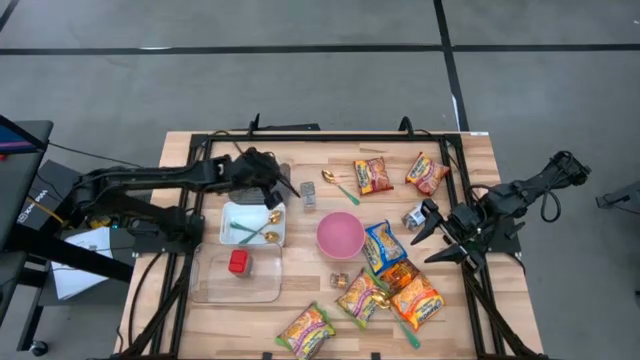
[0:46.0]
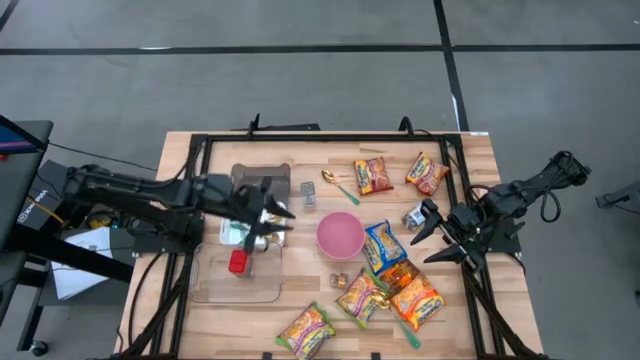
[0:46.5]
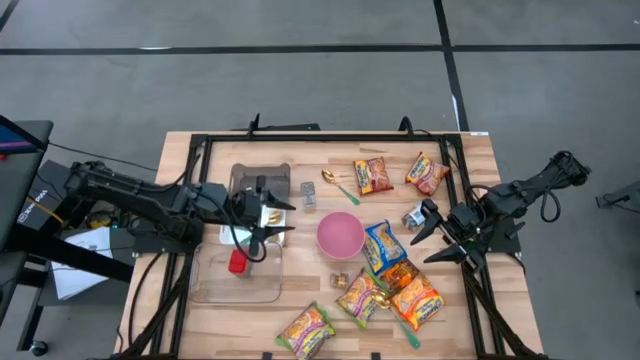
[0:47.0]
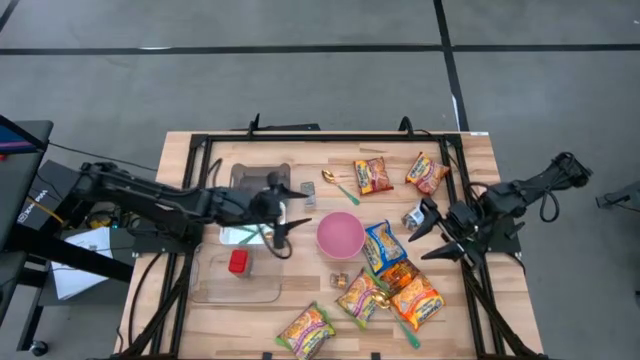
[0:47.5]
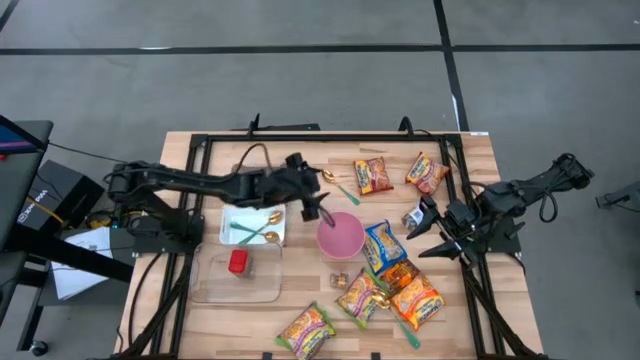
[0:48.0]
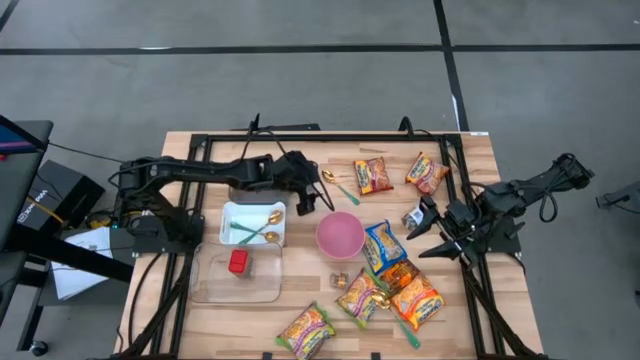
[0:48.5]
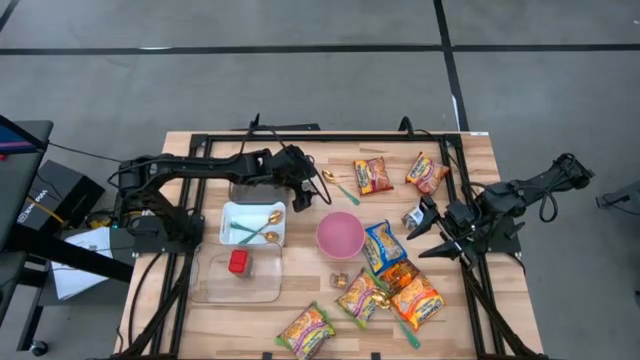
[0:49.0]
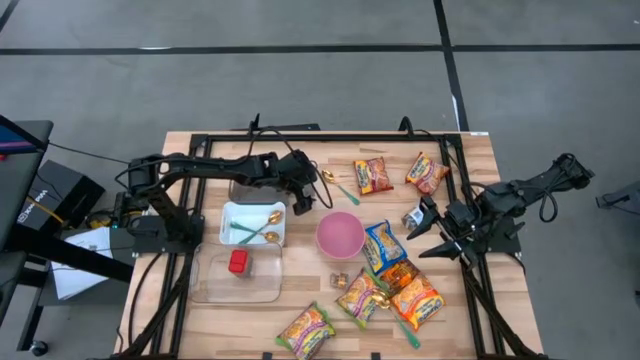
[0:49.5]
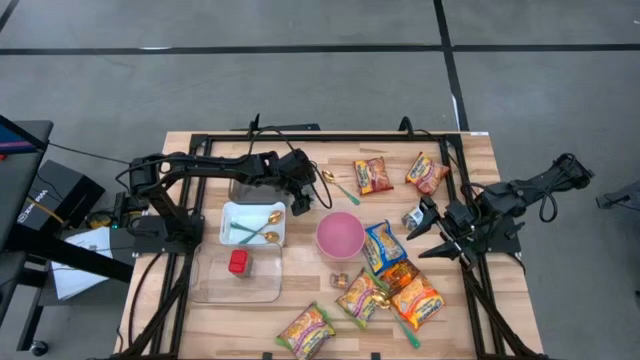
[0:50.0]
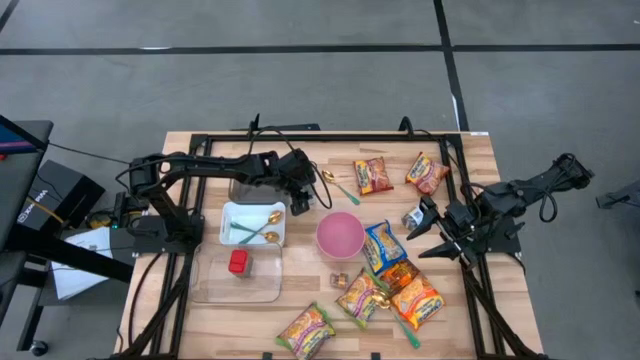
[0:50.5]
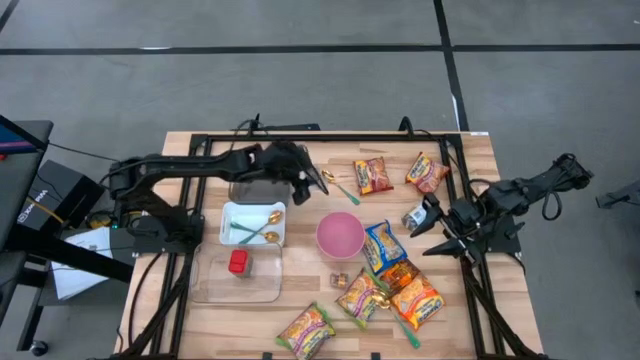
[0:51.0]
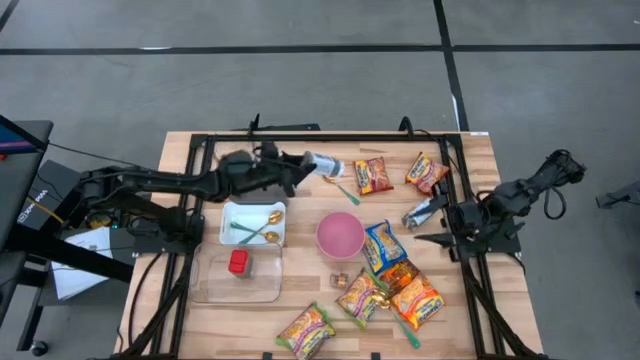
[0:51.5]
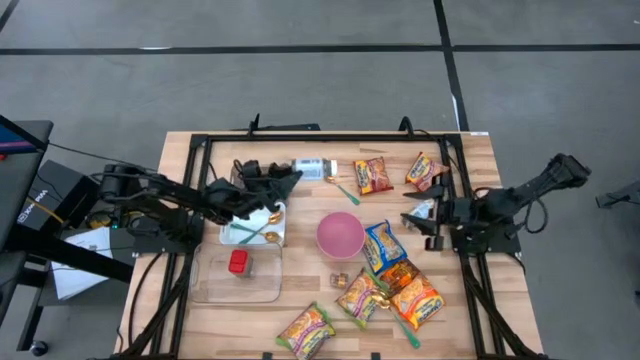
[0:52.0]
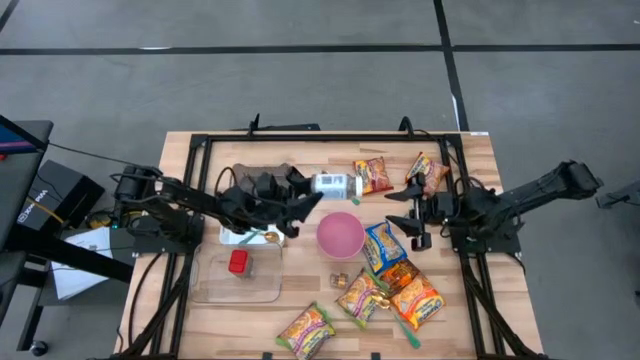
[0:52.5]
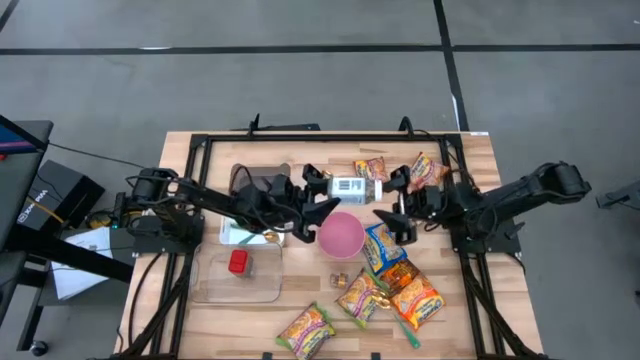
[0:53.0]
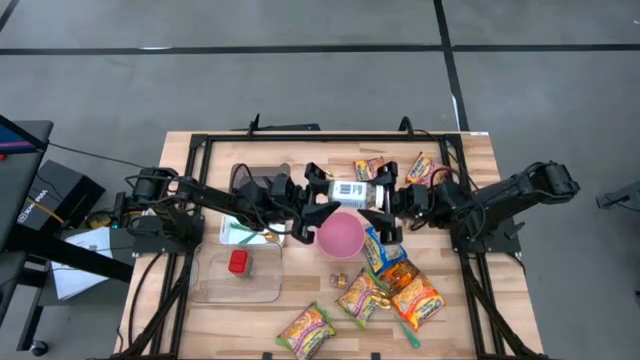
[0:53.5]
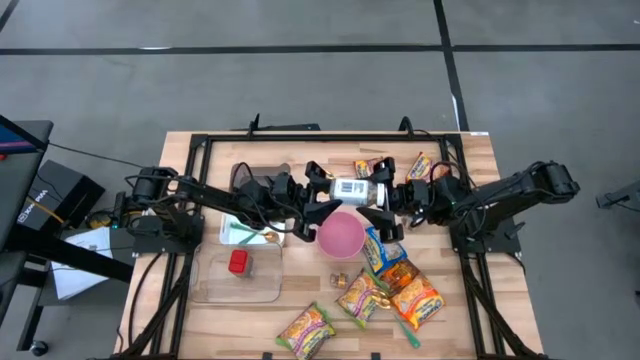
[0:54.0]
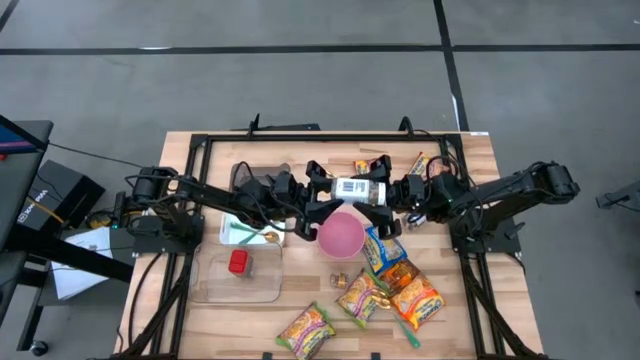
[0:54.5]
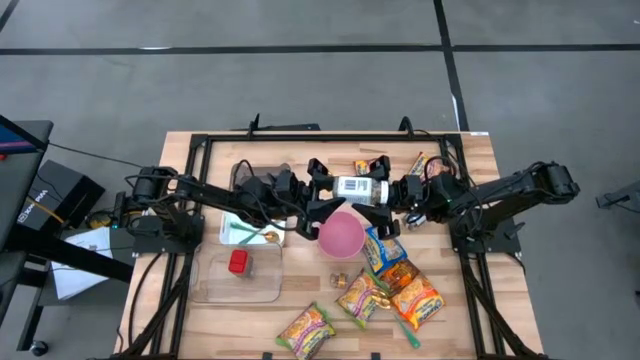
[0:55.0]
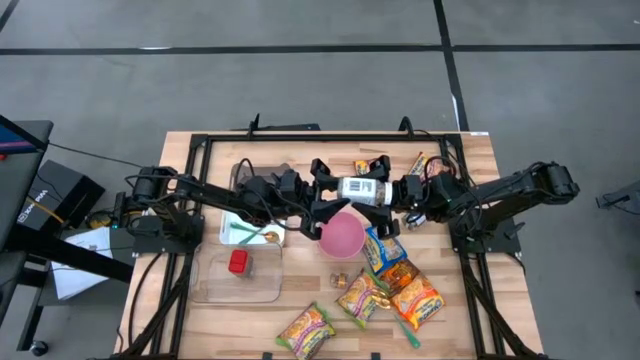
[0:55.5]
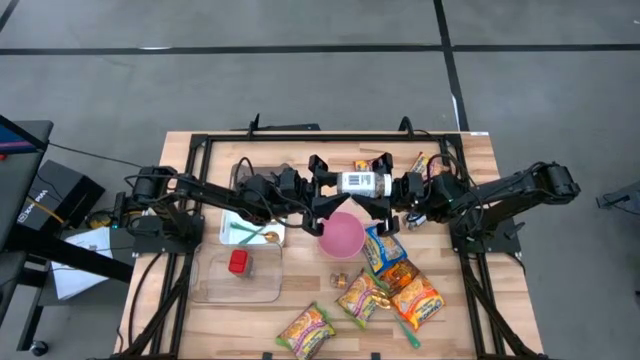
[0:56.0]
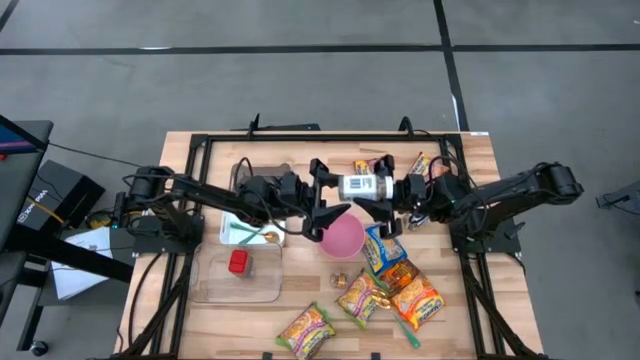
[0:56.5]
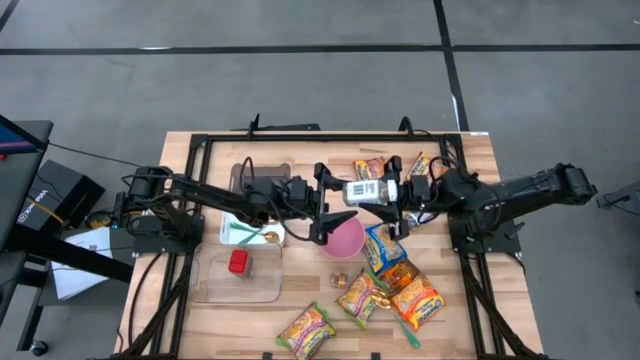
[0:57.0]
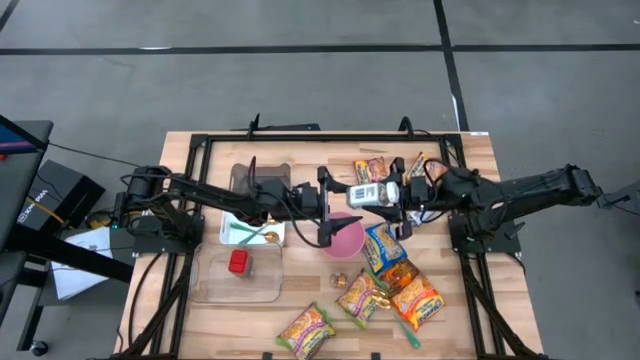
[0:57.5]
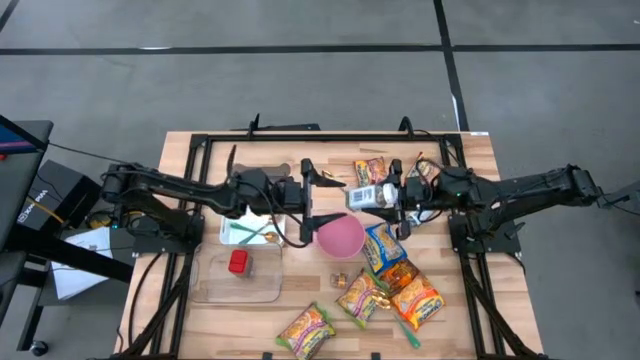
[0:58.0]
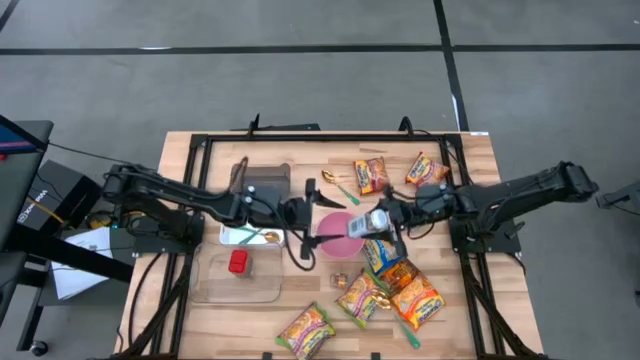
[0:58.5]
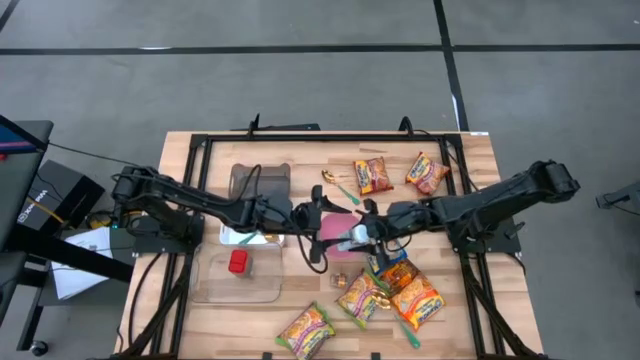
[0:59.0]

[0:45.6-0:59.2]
Task: Pick & Place Food Item
Put the white spice bottle into the transparent bin

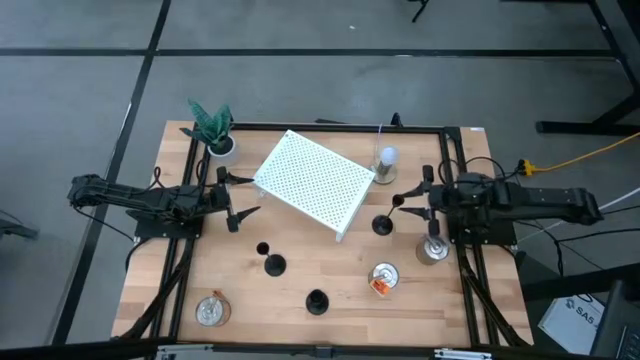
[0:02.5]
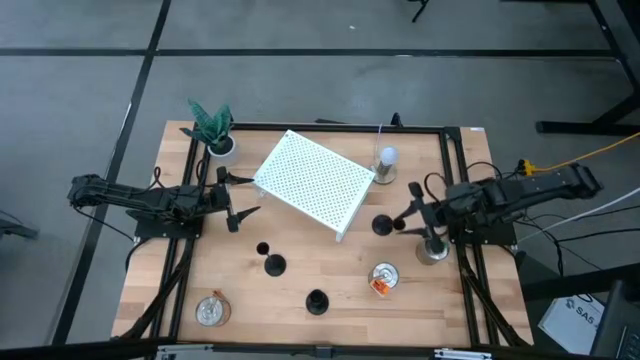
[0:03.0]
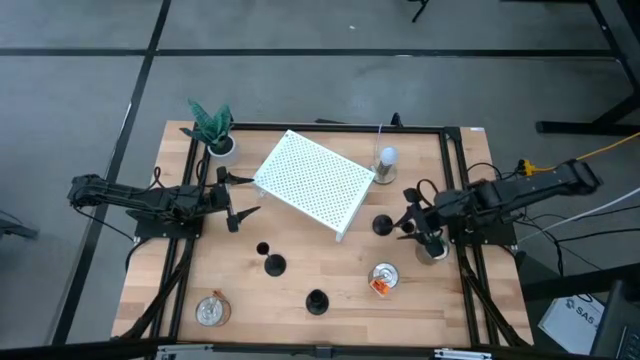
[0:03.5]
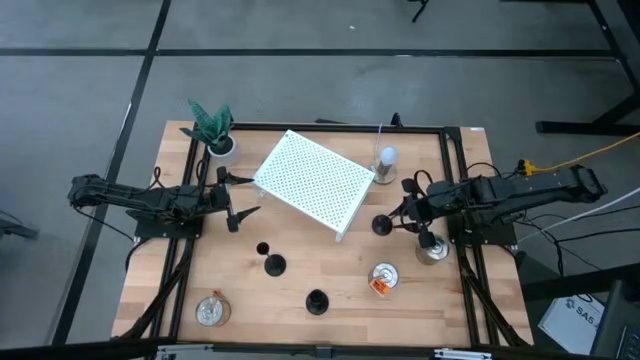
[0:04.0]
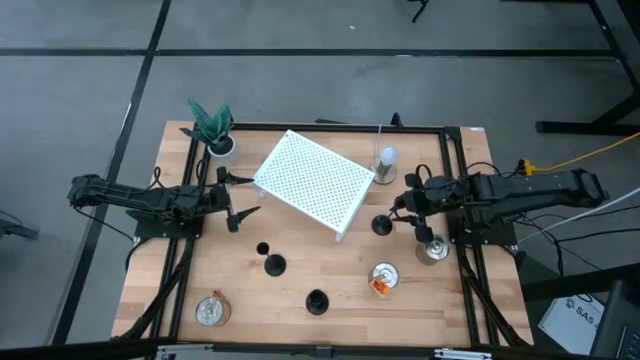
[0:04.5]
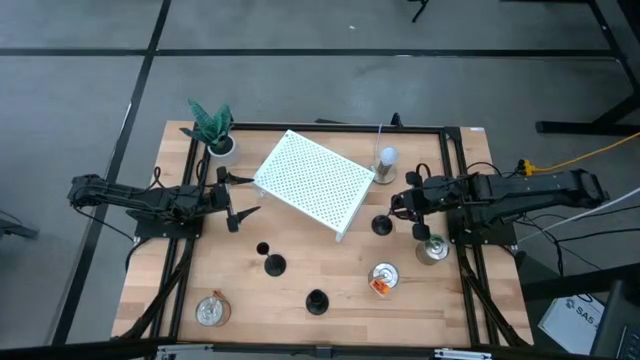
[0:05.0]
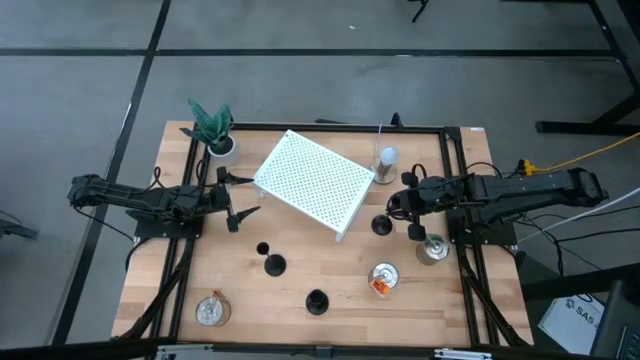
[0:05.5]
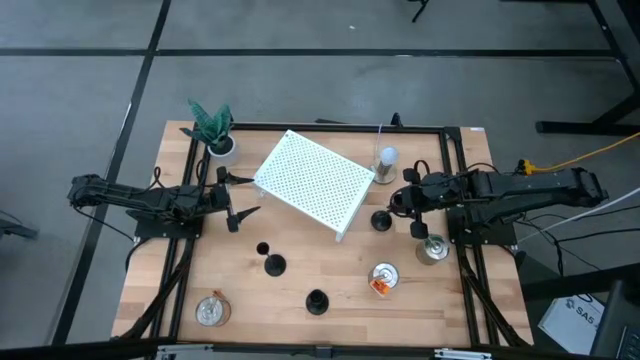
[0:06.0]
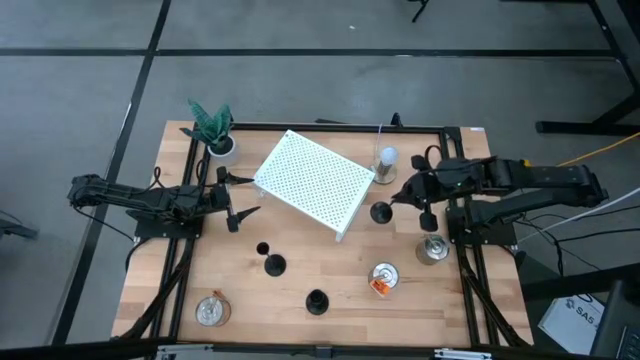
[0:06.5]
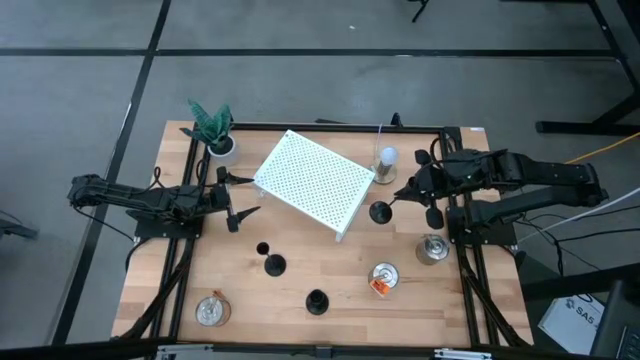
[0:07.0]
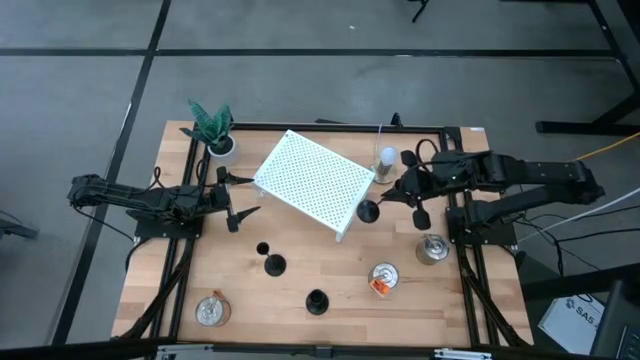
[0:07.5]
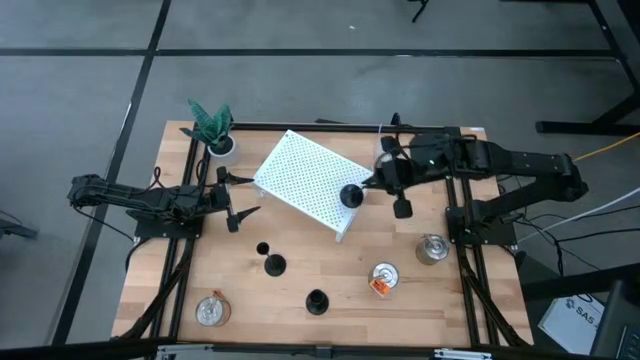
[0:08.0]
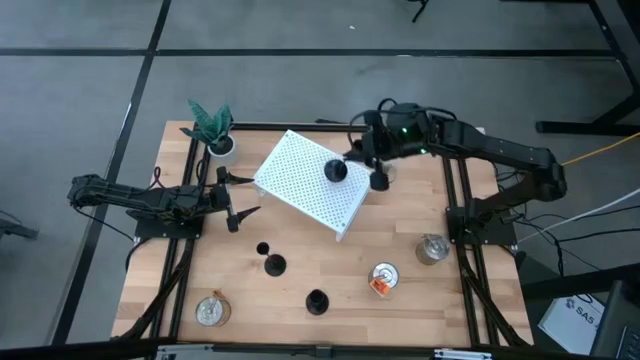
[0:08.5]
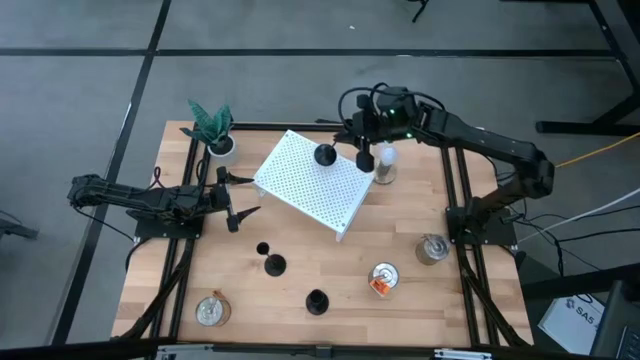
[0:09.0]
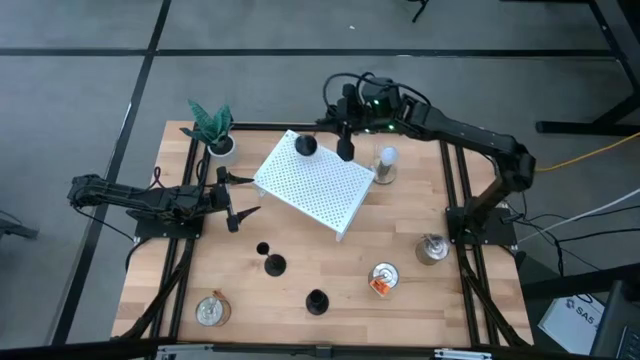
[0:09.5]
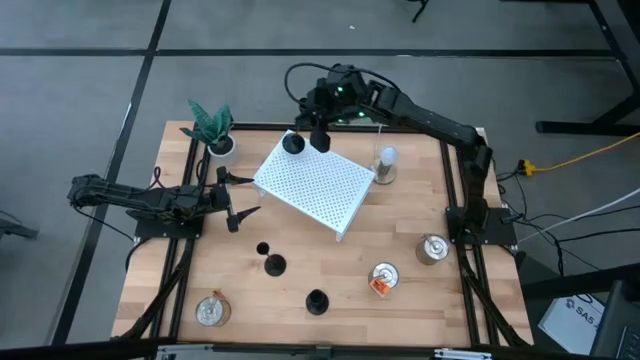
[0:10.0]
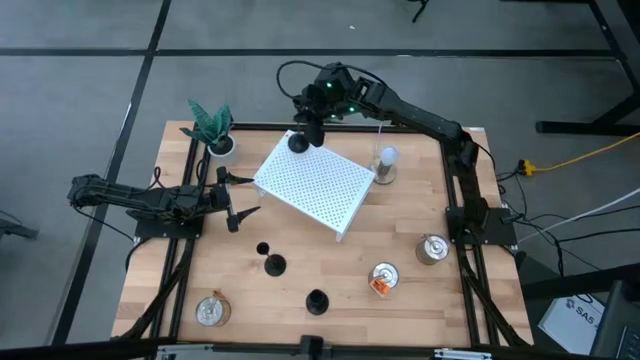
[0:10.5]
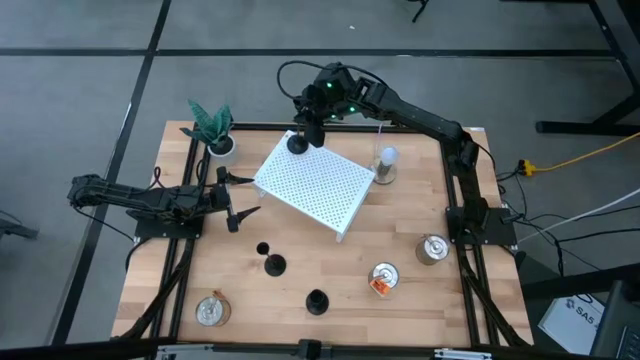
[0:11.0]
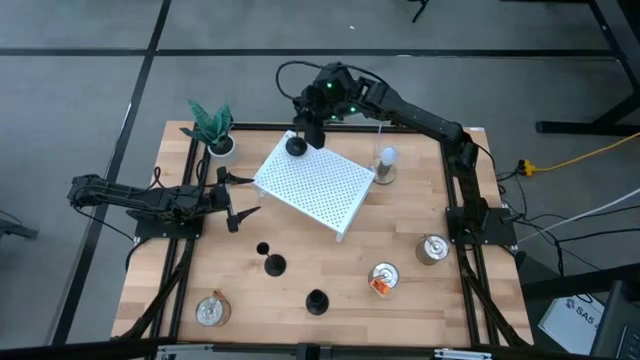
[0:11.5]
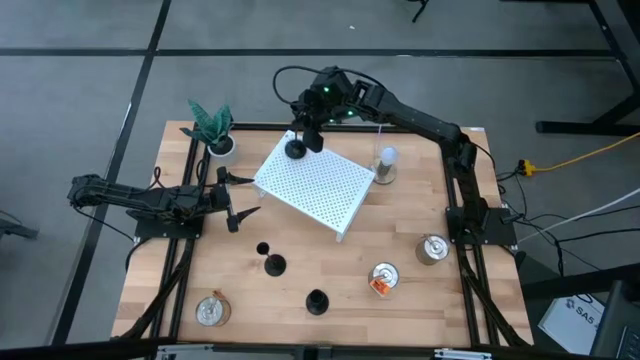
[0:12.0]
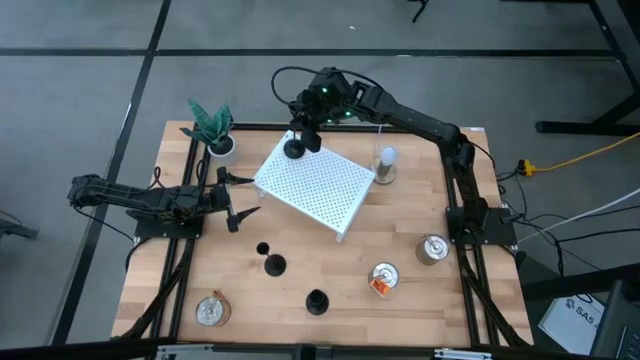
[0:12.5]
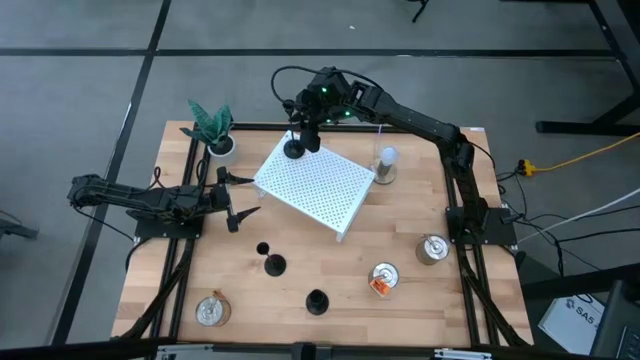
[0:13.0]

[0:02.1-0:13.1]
Task: Pick & Place candle stick holders
Put the top black candle holder on the shelf
